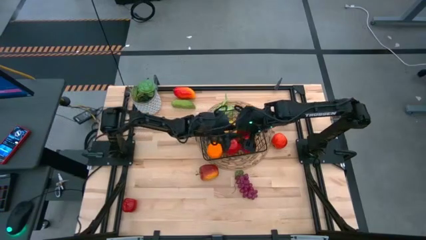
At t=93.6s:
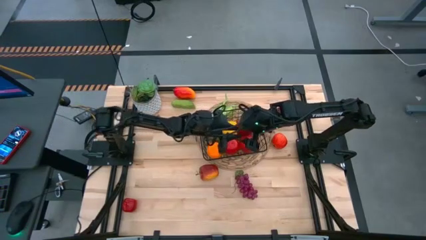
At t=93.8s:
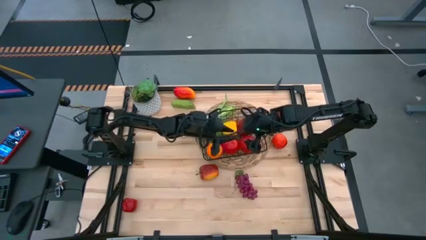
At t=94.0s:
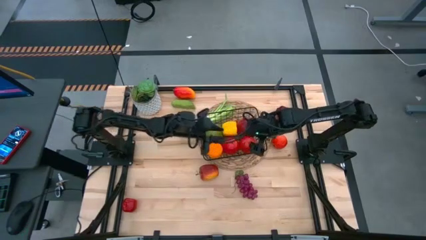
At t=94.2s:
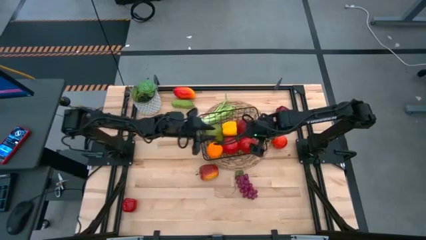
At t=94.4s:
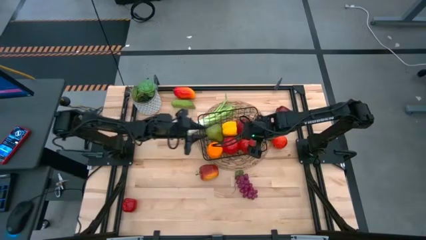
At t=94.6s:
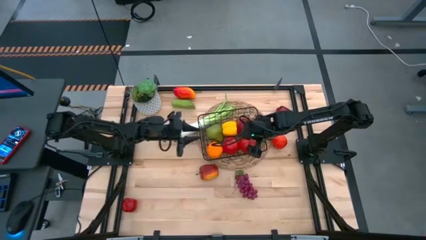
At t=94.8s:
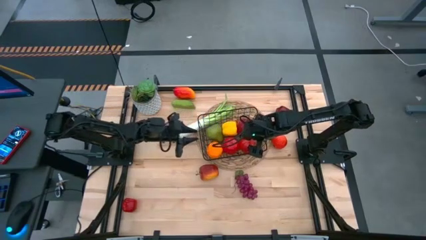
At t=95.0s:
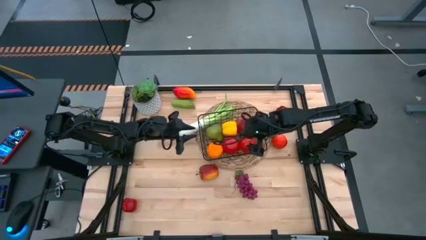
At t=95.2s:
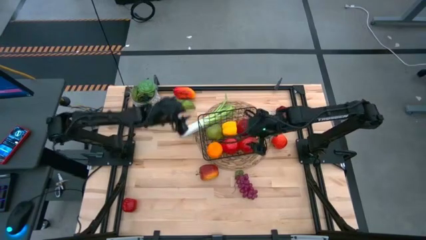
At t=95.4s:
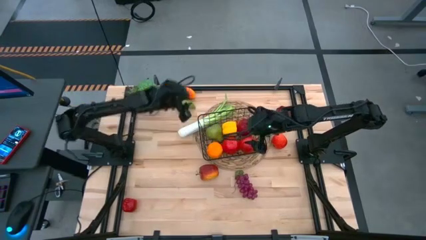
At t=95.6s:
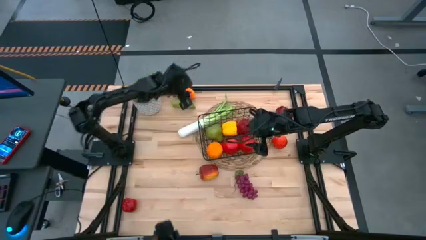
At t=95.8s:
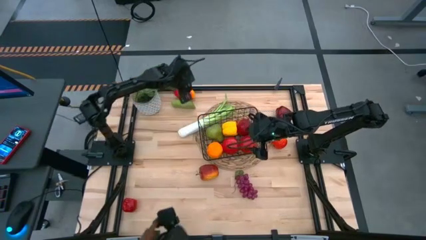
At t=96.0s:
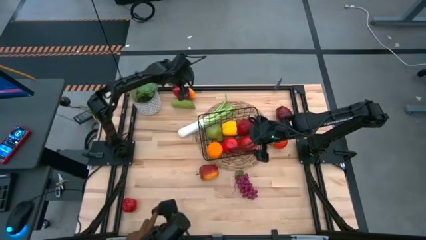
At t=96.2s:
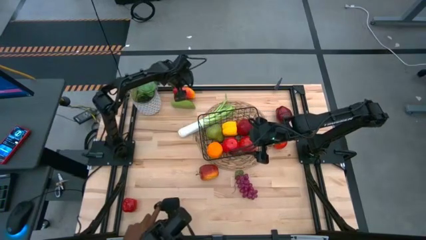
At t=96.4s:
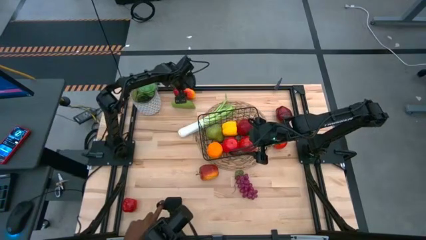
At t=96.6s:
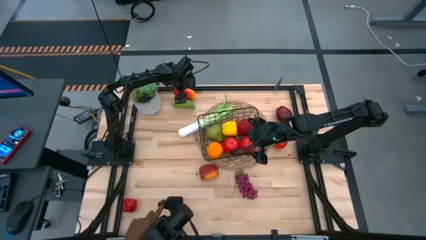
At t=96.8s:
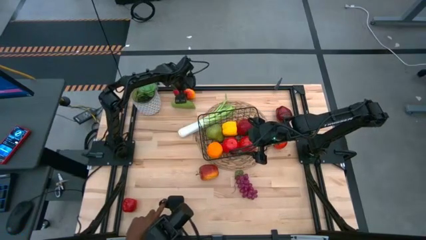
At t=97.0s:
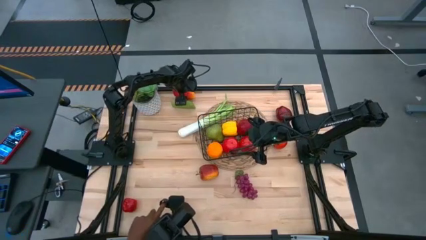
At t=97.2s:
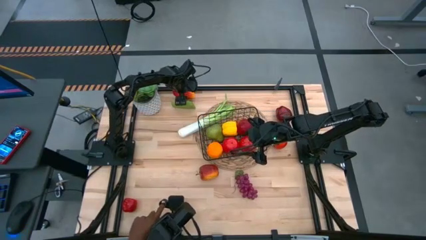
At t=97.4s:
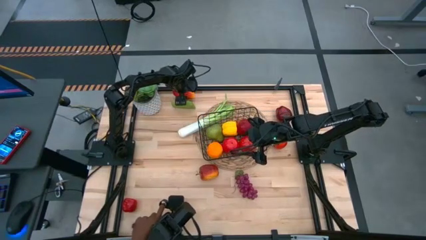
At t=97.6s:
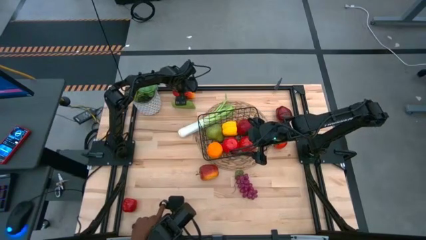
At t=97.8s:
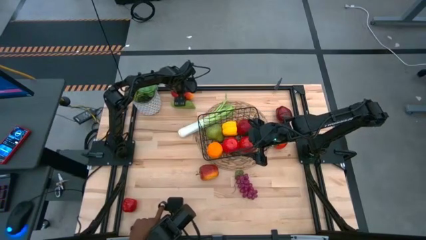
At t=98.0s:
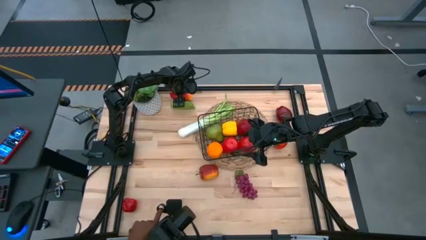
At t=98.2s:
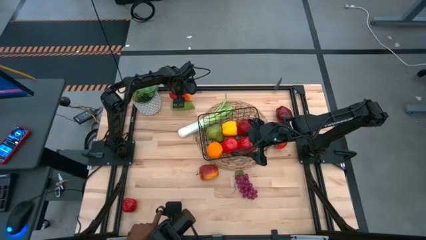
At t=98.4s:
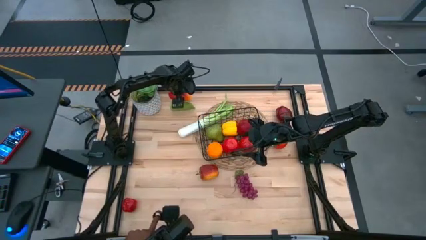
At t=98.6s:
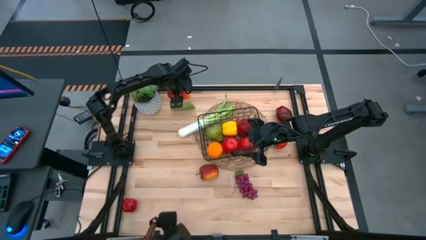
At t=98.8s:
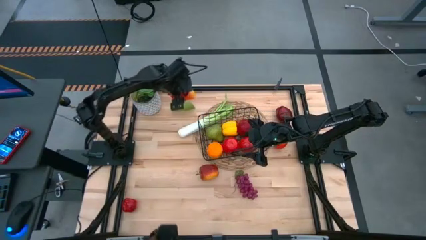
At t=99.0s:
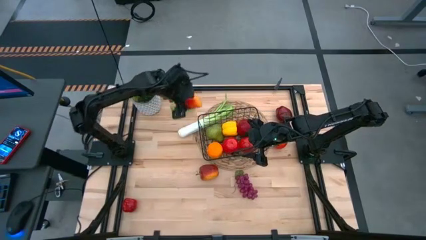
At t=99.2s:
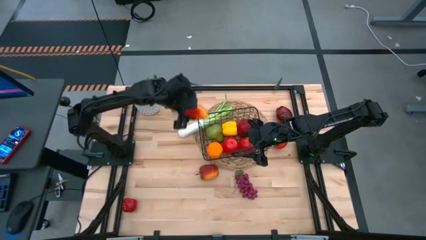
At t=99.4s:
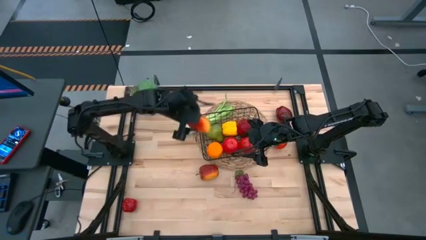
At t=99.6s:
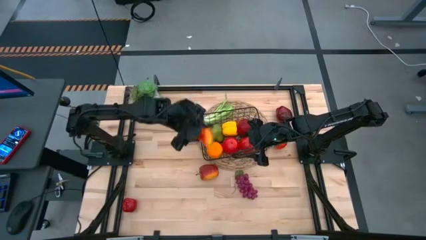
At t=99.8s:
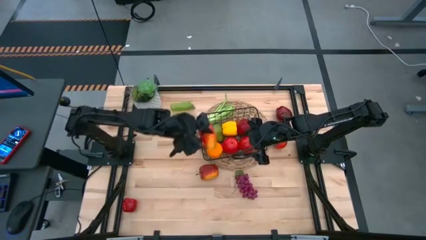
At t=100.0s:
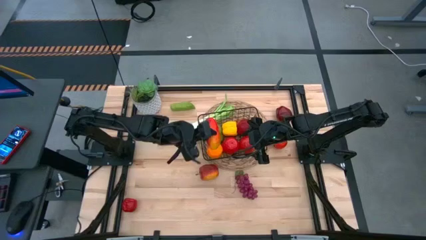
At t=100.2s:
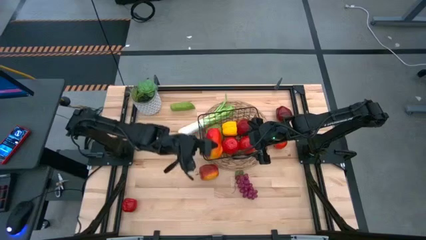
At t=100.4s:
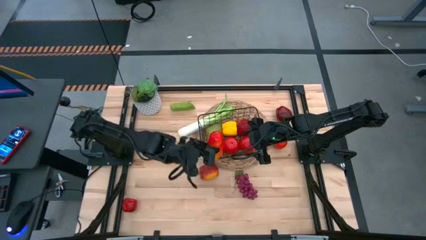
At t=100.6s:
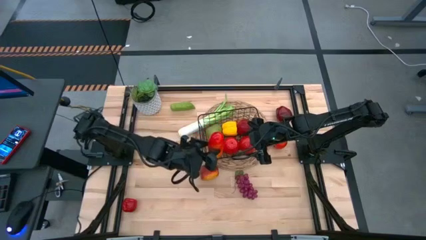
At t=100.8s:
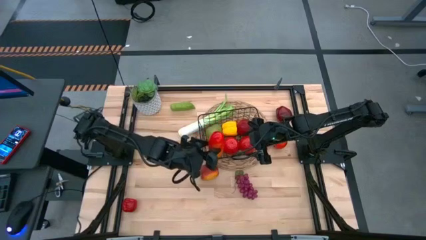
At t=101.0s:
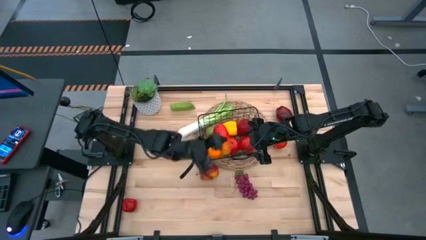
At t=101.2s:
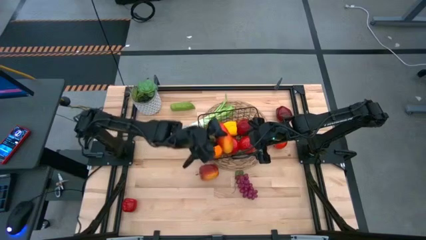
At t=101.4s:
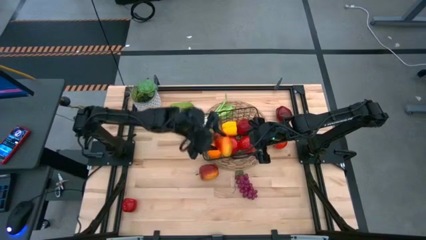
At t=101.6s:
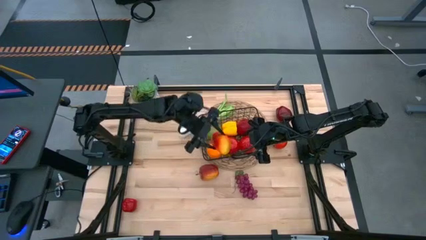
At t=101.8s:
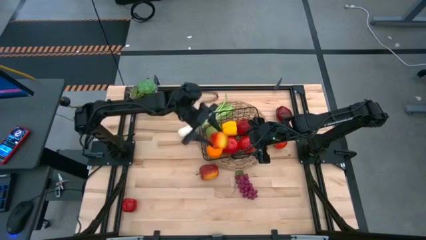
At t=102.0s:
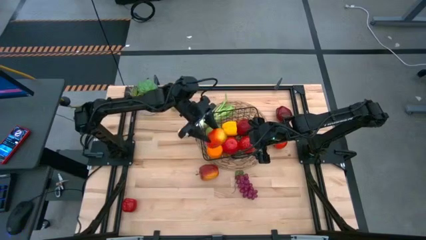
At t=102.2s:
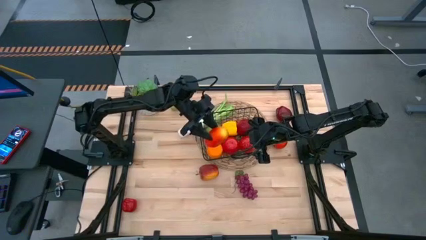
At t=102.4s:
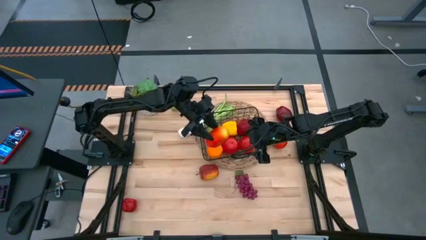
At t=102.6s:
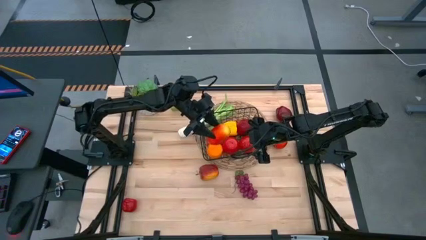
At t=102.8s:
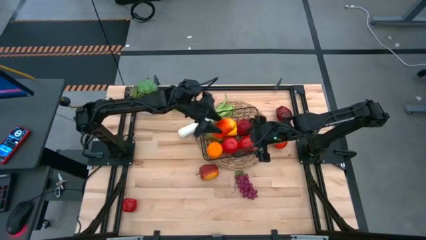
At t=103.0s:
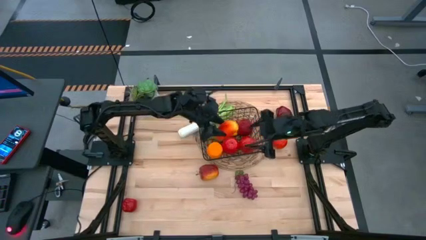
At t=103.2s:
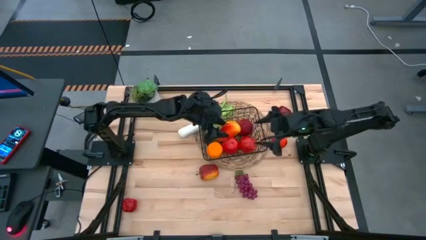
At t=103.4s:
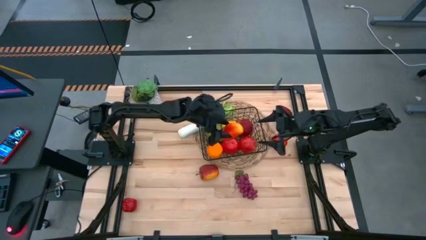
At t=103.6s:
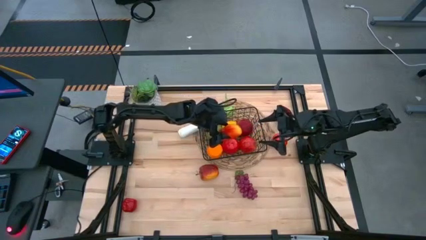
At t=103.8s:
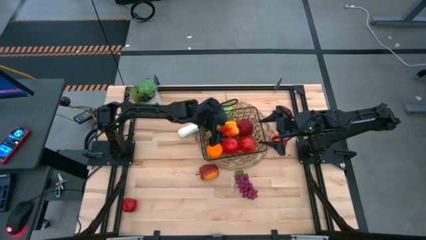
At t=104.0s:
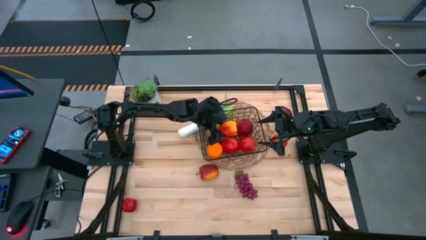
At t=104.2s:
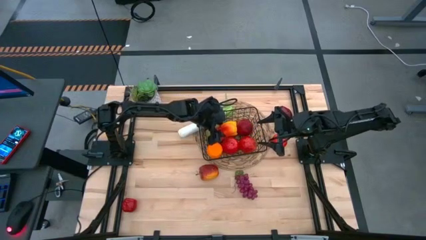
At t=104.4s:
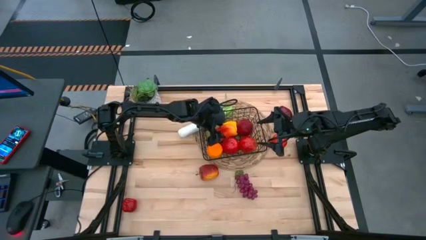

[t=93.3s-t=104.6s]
Task: Build produce basket
Put the mango into the wire basket

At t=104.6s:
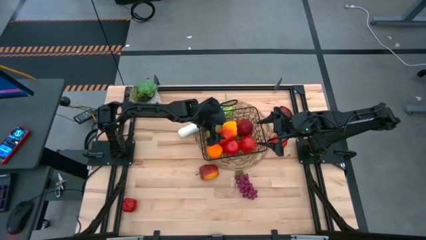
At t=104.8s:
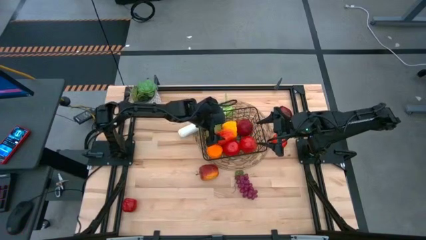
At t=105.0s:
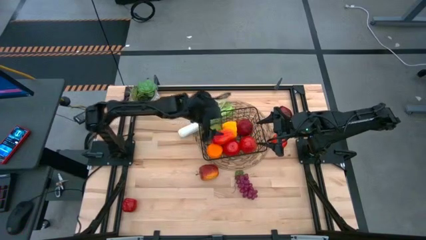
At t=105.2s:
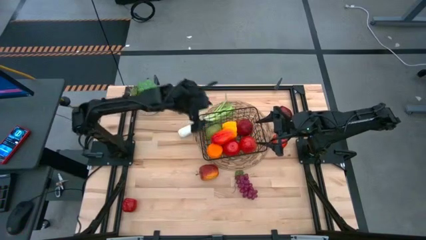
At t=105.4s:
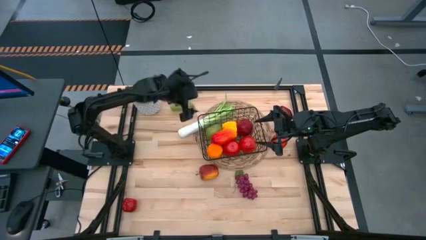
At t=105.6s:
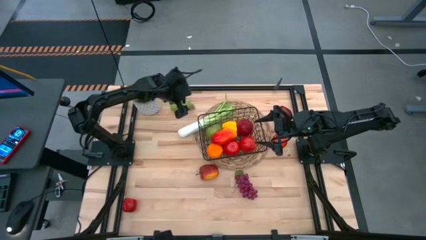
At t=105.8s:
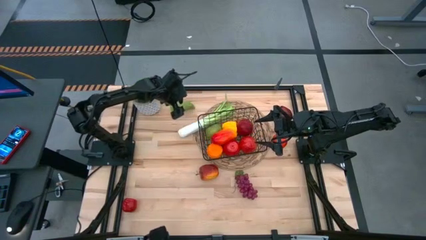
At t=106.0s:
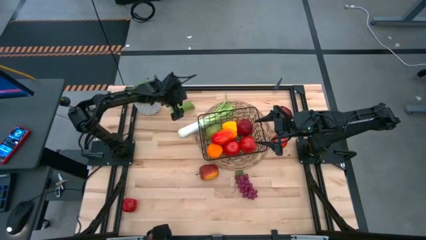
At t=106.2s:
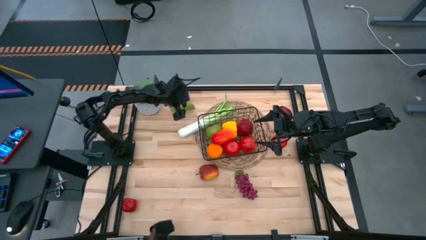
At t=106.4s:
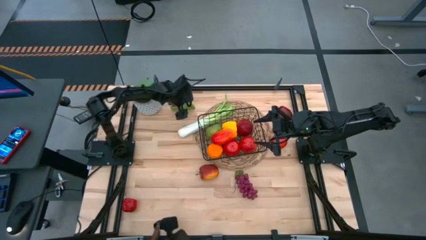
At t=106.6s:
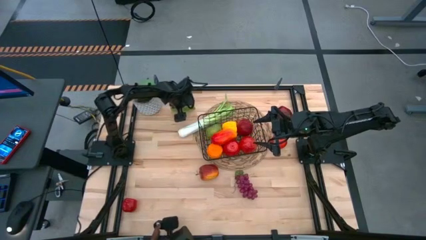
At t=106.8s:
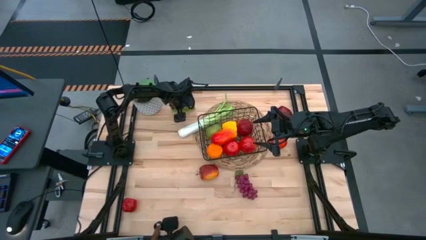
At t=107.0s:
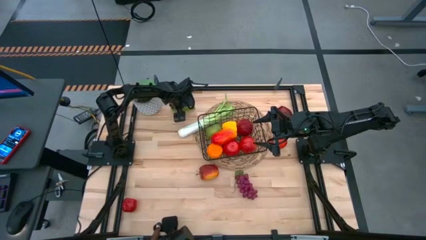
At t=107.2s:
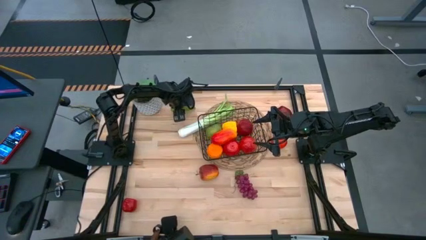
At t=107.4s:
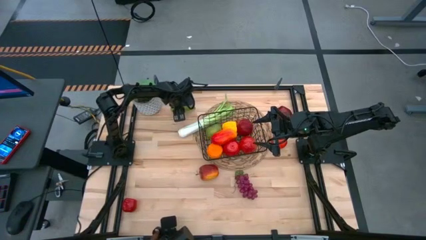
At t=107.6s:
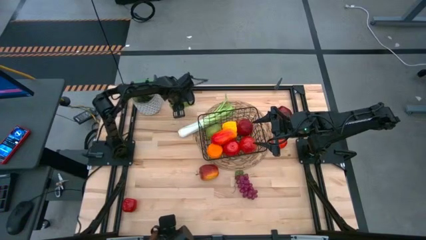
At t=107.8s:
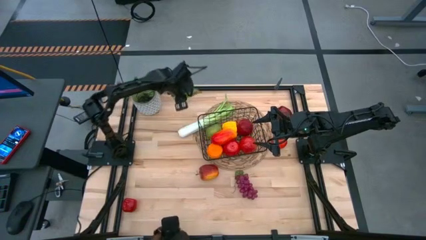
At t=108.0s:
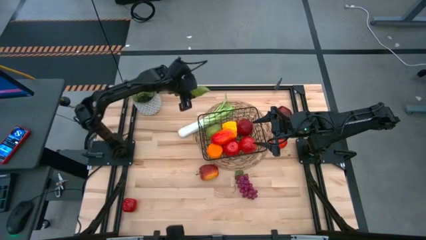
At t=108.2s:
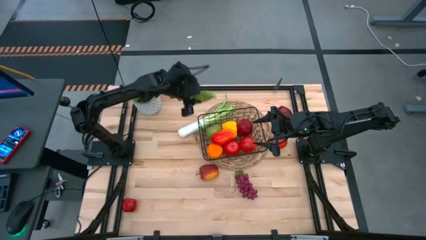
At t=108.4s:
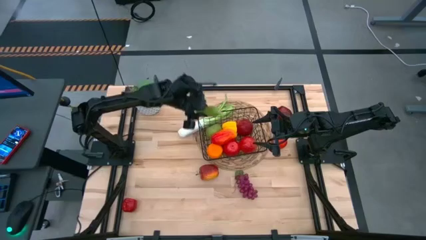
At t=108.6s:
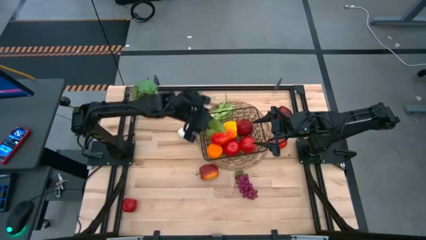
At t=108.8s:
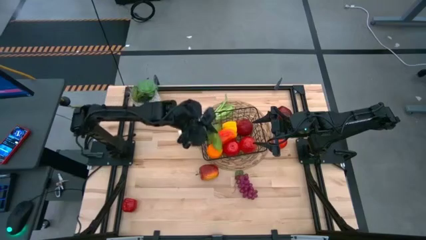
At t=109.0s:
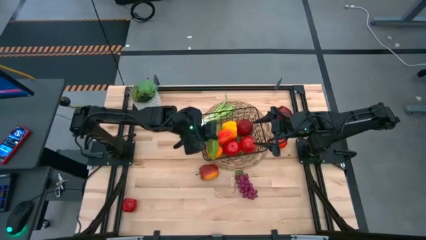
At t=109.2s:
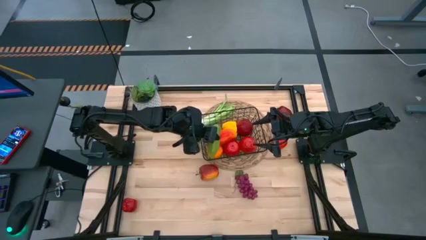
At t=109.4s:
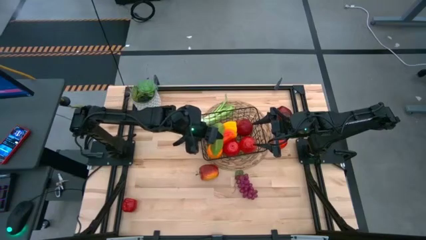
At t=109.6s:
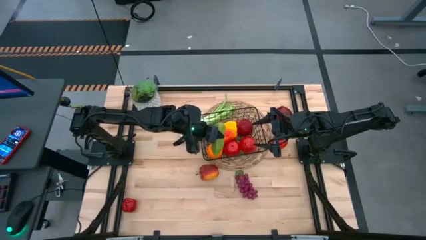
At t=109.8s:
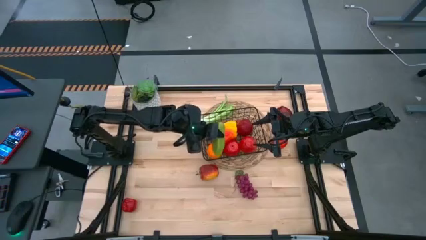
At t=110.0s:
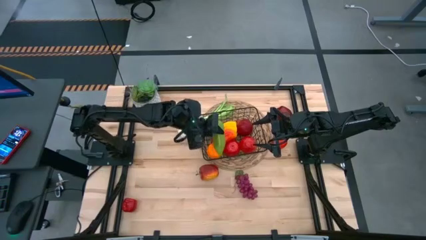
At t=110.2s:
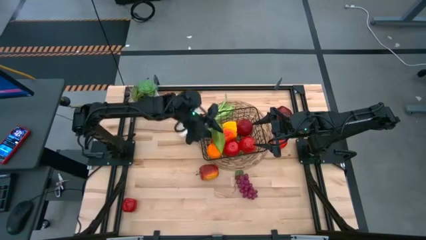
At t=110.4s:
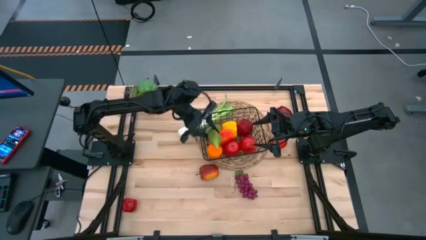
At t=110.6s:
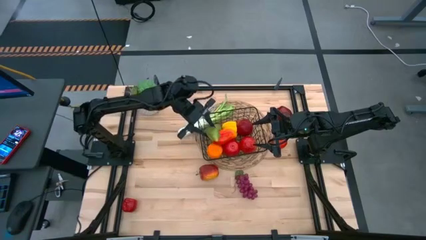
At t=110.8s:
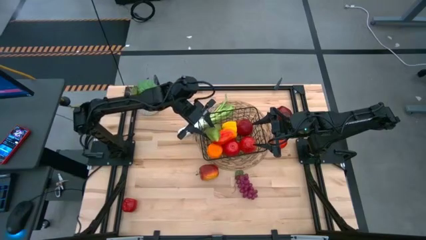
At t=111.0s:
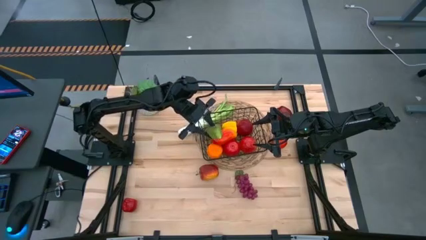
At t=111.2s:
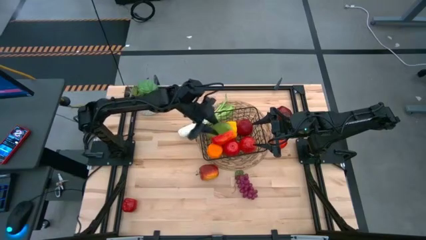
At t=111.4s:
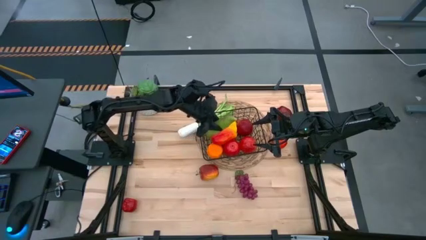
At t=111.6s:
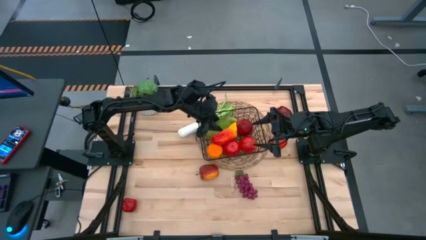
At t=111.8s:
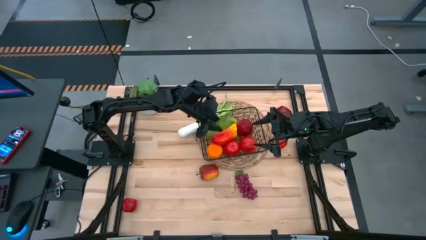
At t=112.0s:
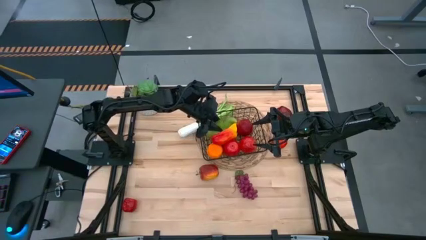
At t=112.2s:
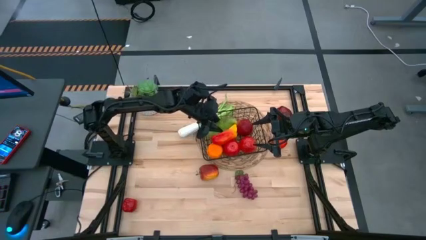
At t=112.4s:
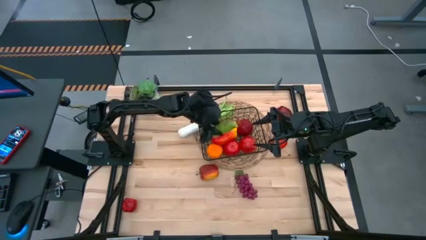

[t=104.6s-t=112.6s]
Put the cucumber into the wire basket
